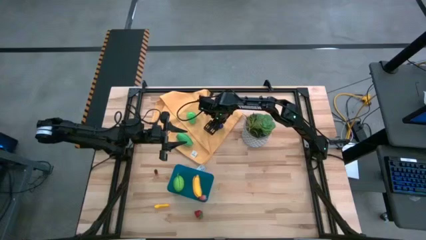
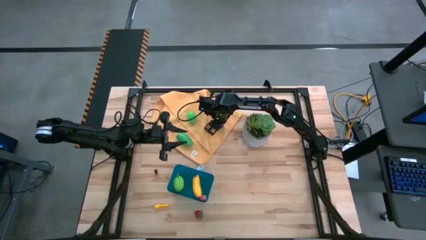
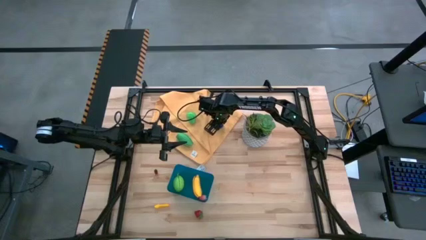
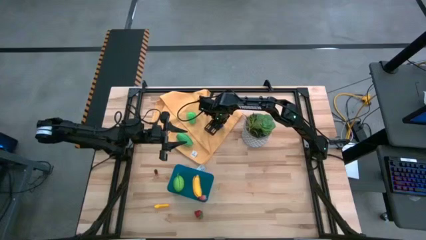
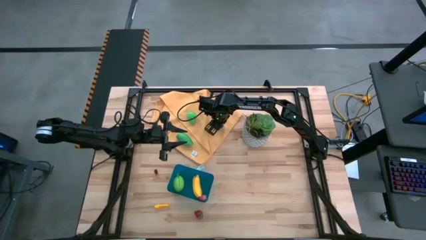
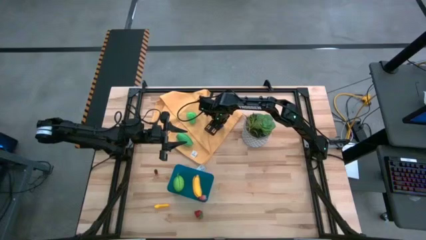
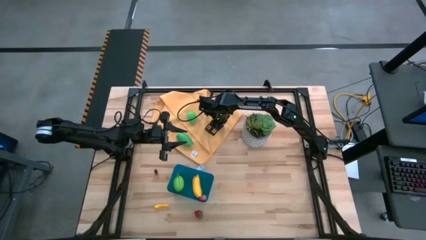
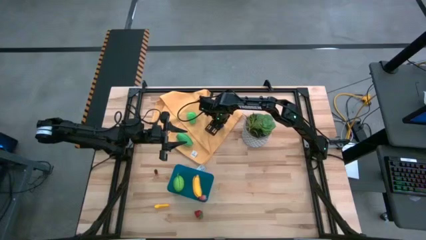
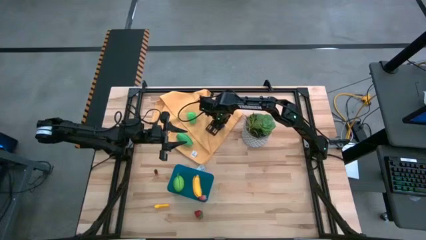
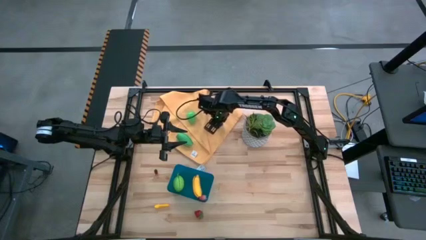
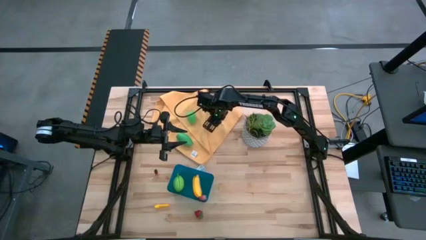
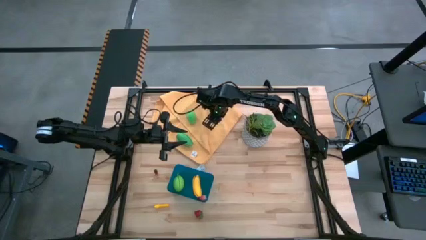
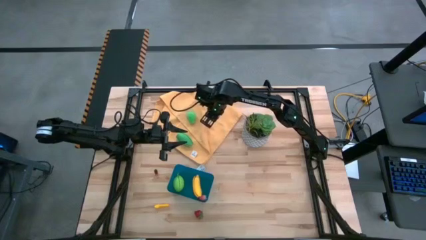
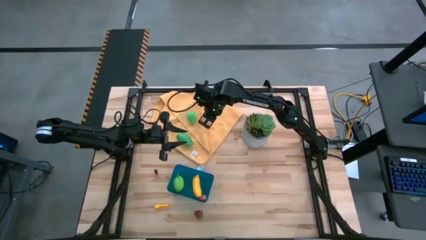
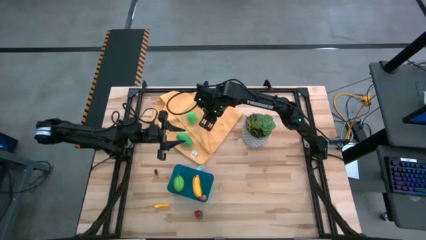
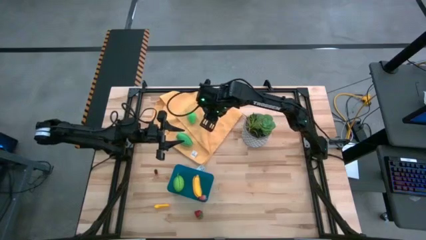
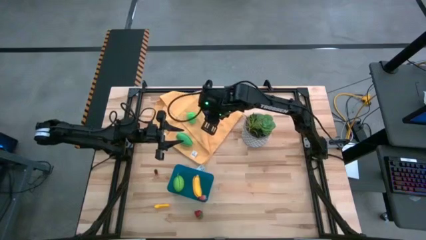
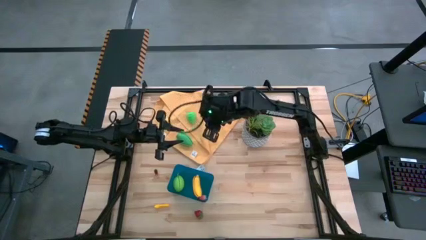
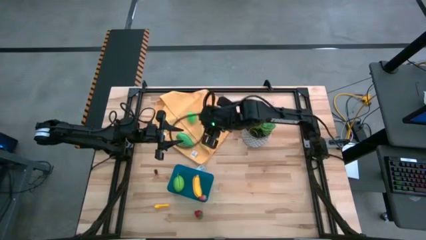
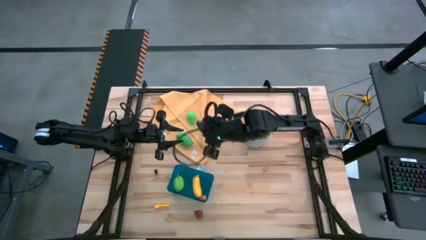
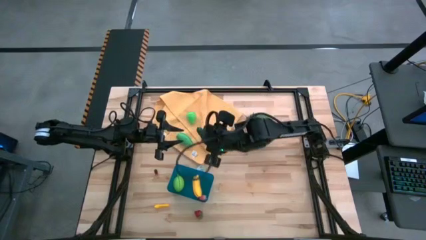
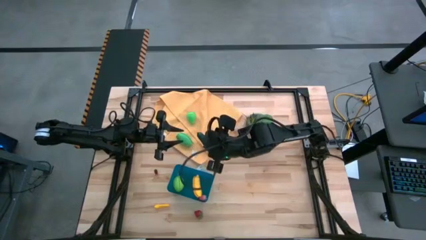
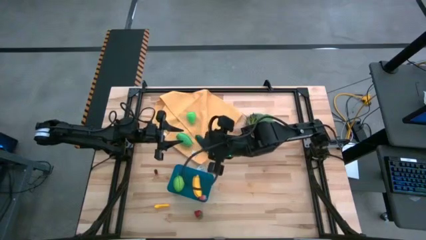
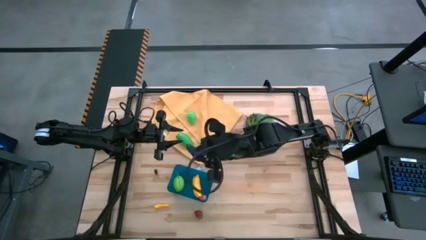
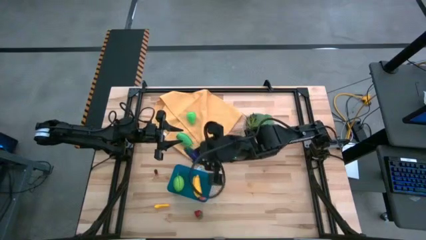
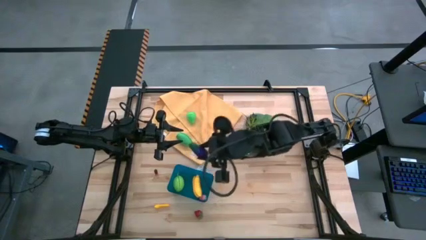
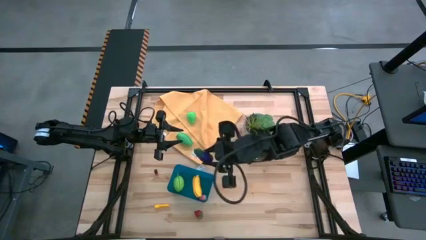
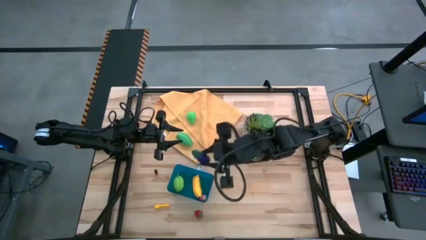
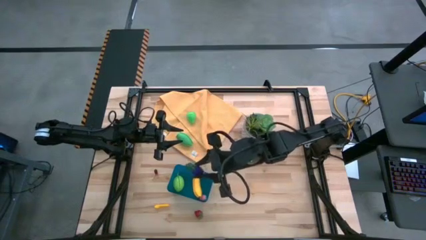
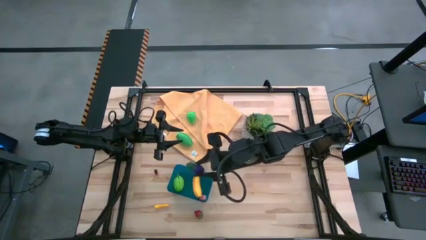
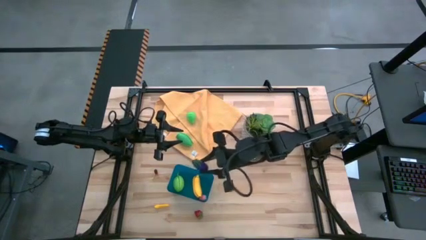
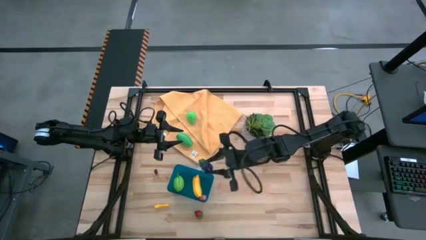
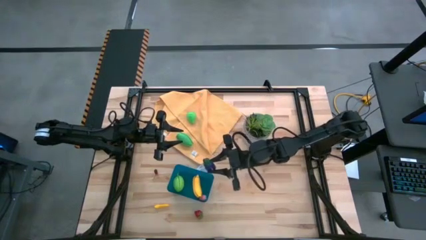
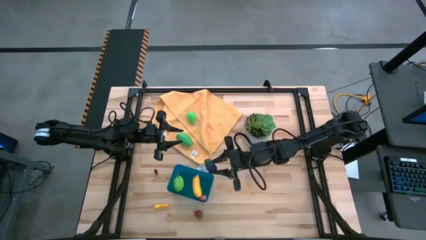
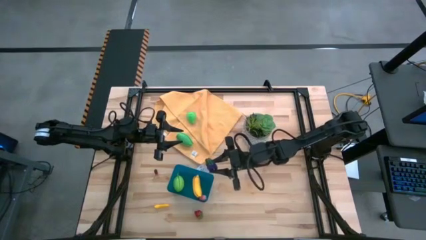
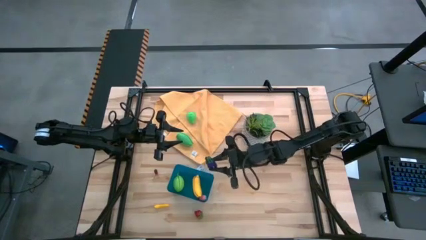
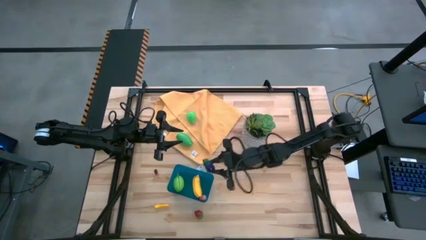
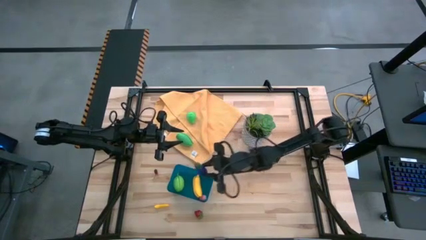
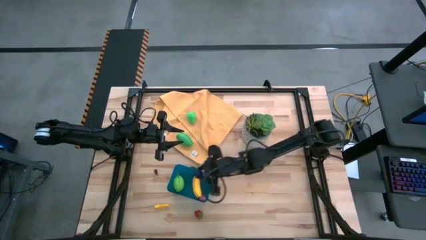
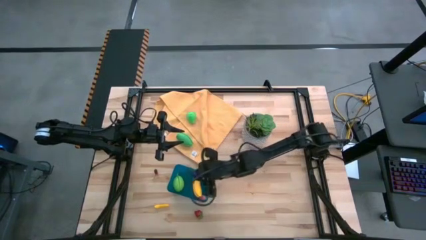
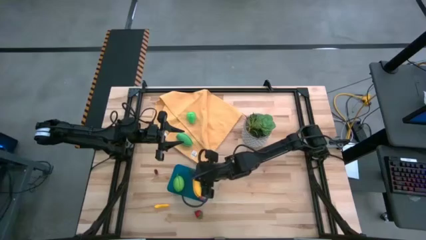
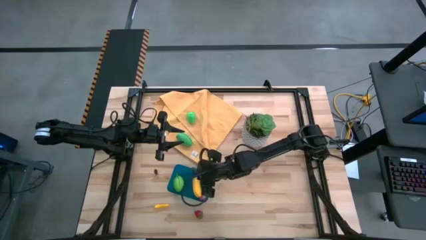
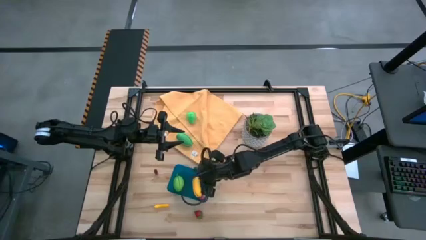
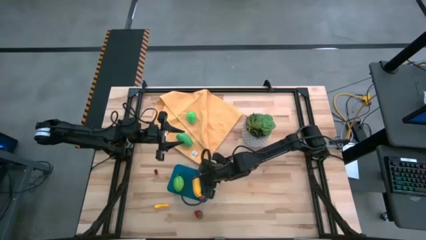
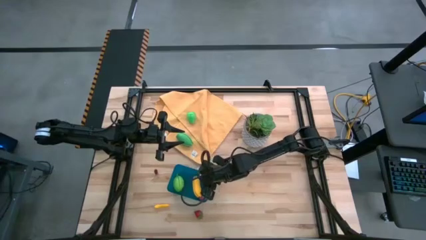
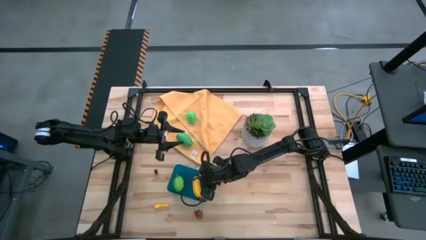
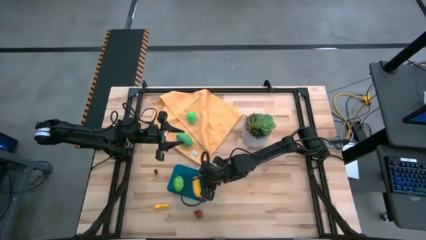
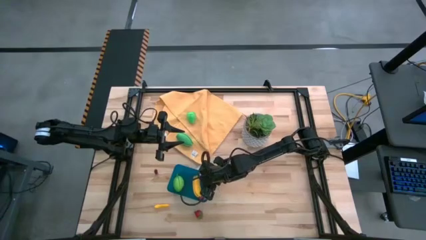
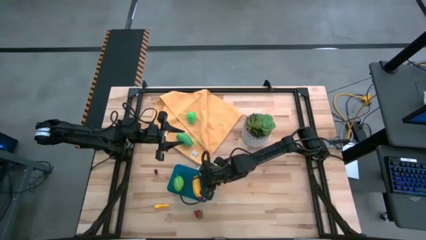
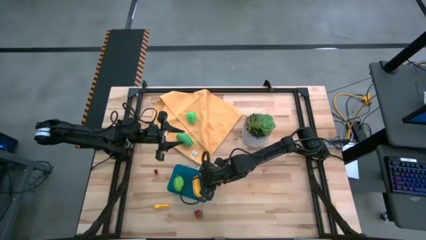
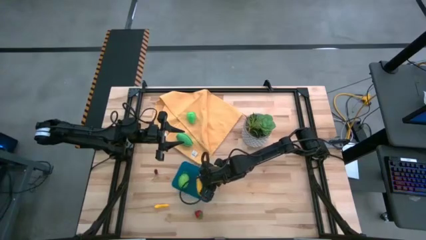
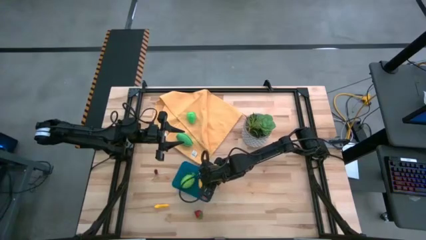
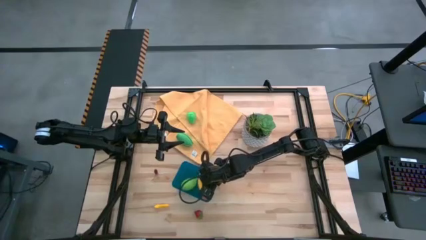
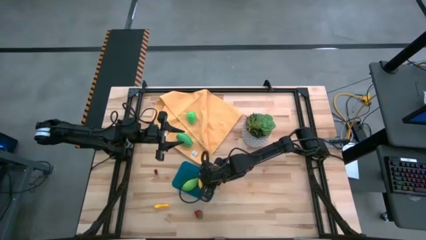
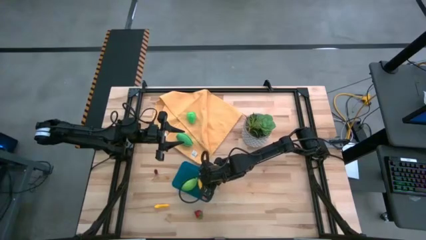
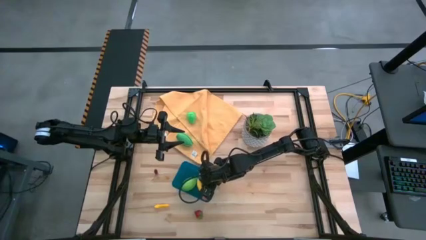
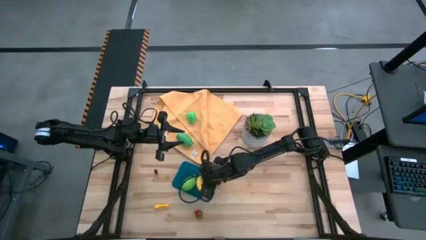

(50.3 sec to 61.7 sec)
Task: Pick and placing Produce into tupperware
Put the eggplant into the blue bin

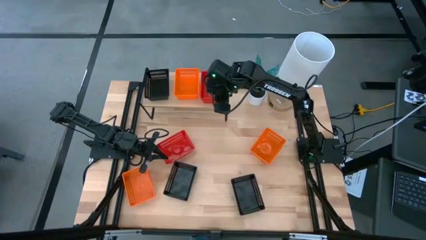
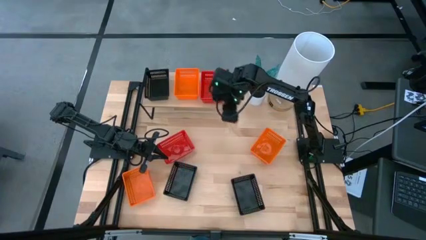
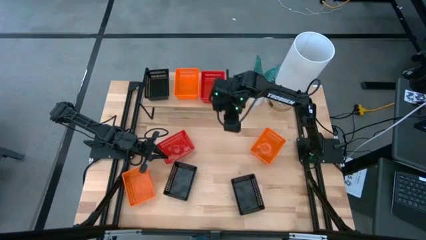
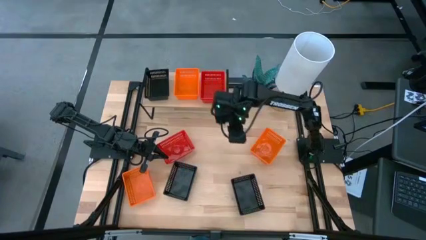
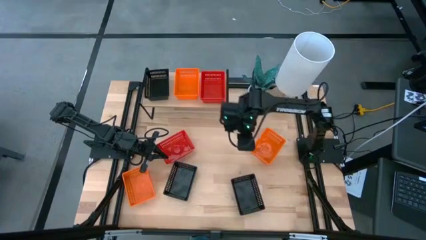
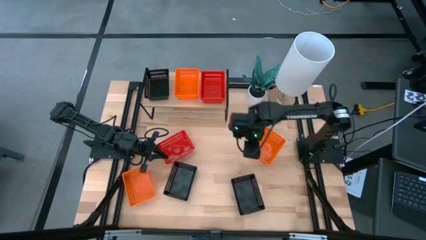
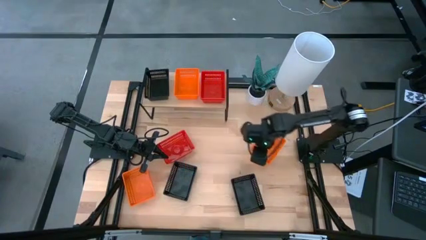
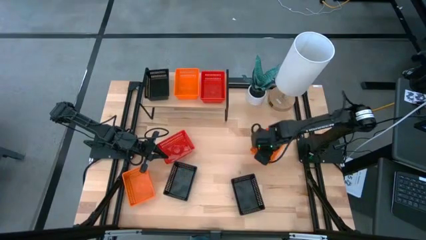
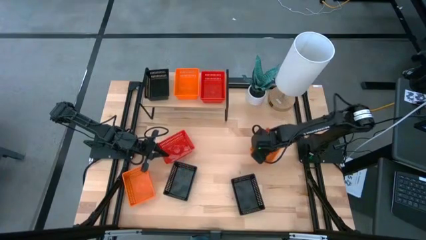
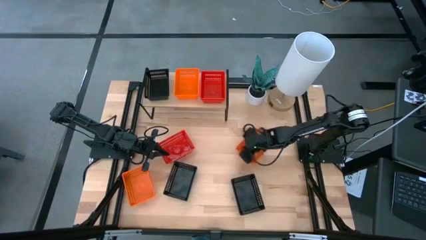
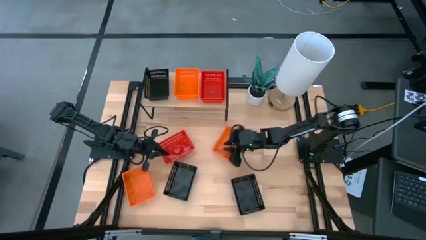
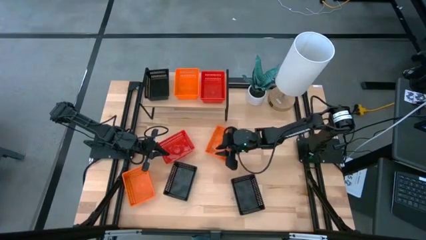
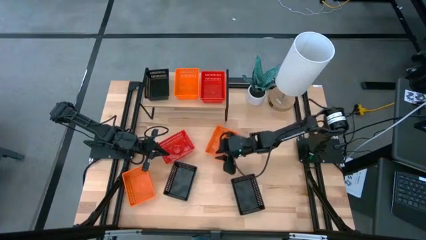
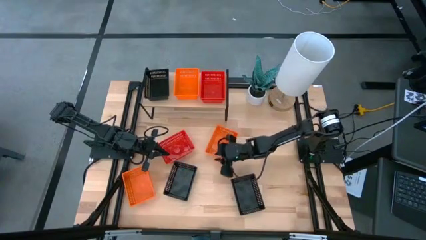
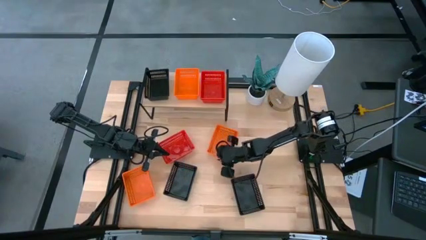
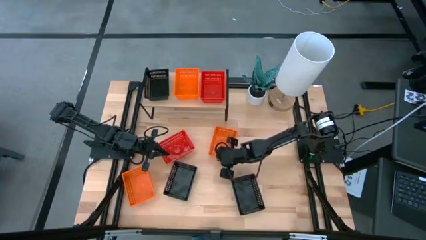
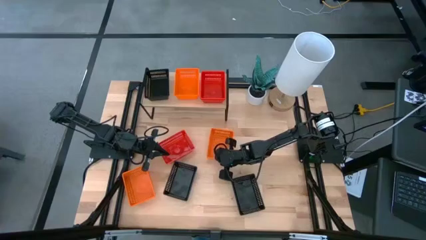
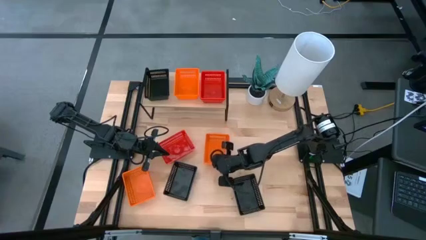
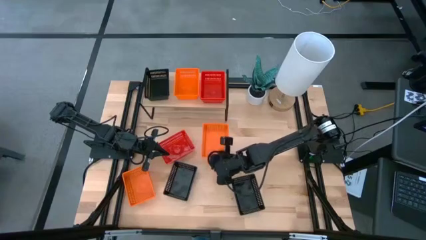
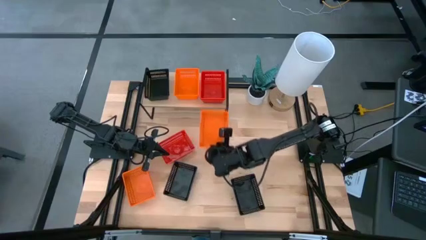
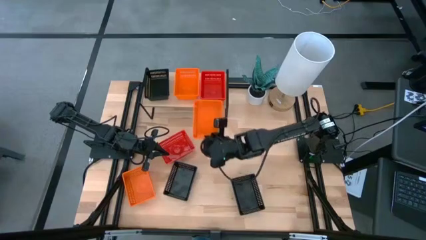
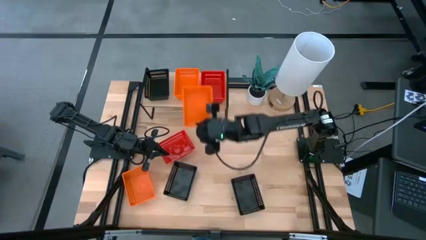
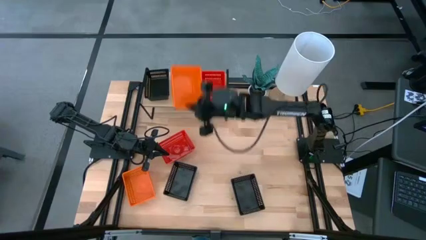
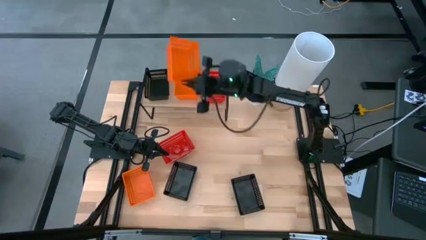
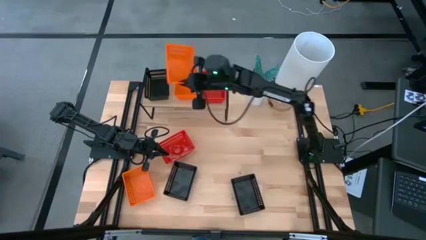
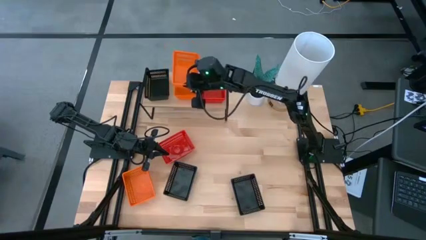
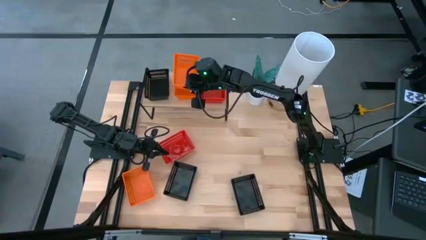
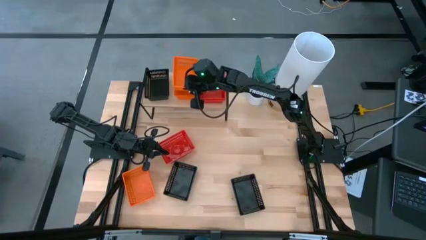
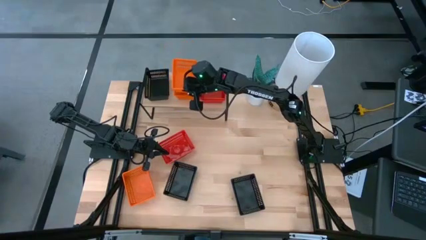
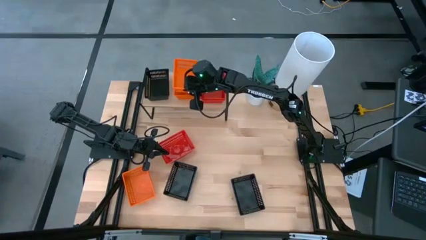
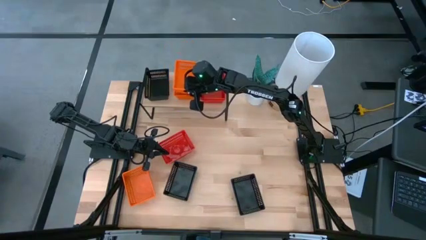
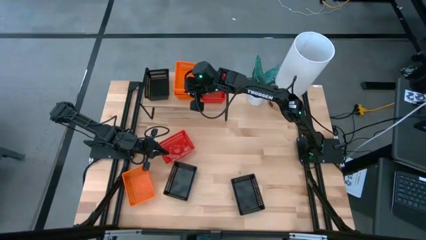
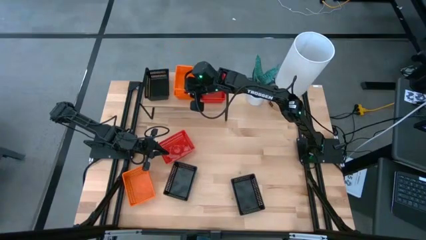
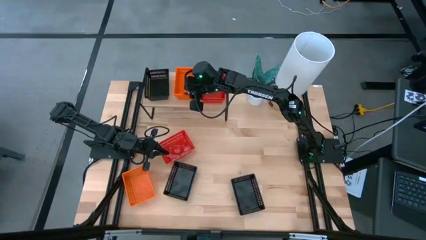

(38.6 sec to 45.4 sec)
Task: Stack baskets on shelf by color
Stack the right orange bin on top of the orange bin on the shelf
